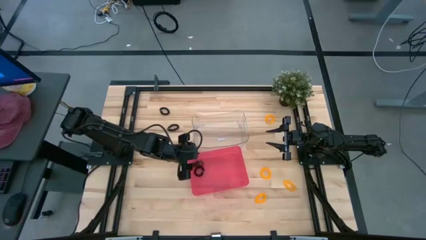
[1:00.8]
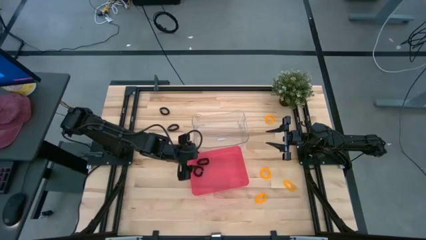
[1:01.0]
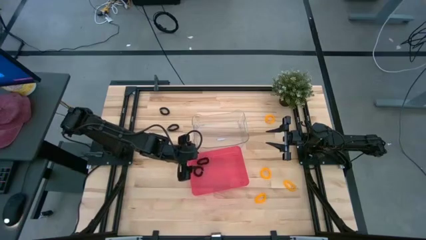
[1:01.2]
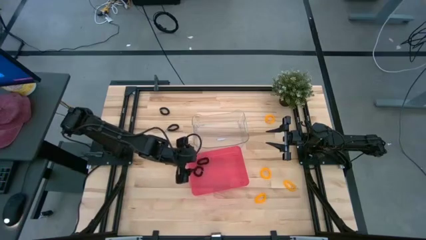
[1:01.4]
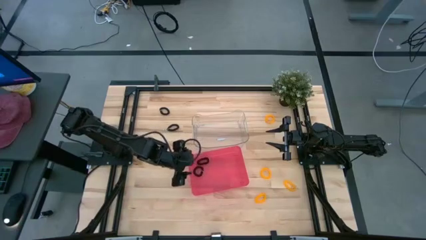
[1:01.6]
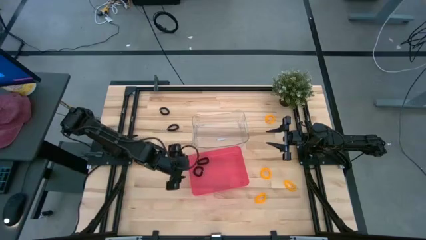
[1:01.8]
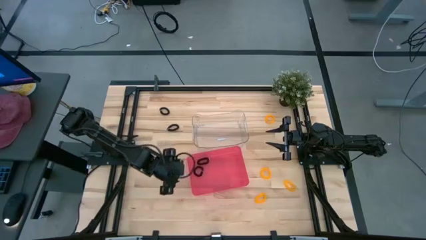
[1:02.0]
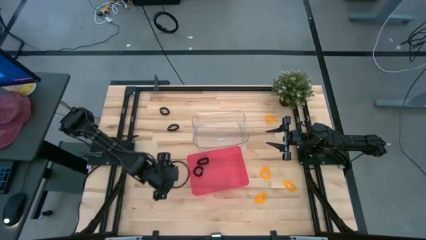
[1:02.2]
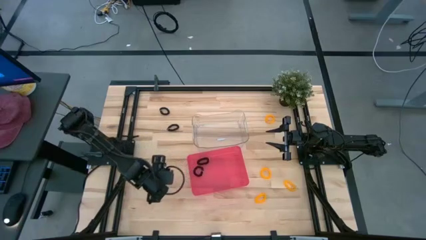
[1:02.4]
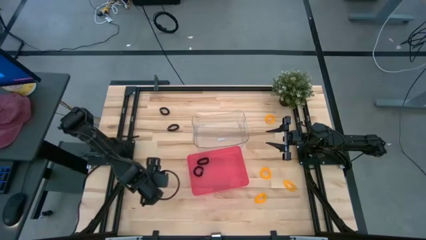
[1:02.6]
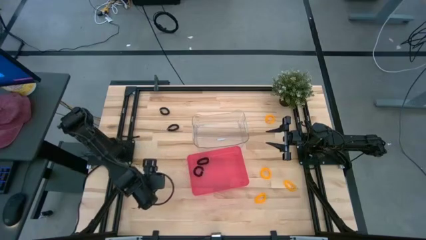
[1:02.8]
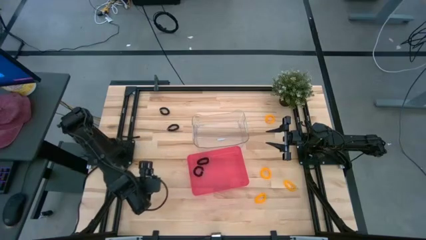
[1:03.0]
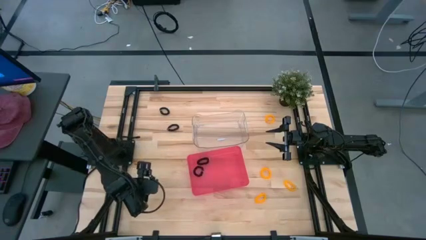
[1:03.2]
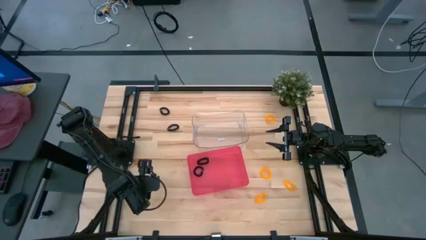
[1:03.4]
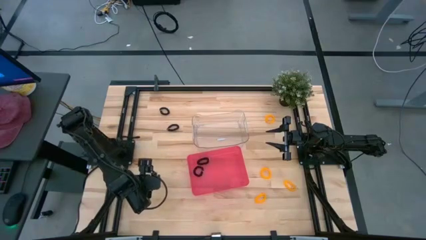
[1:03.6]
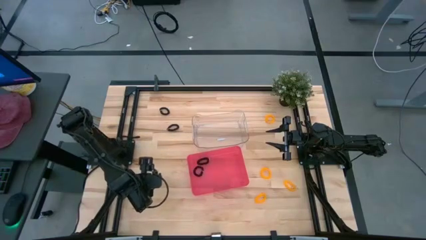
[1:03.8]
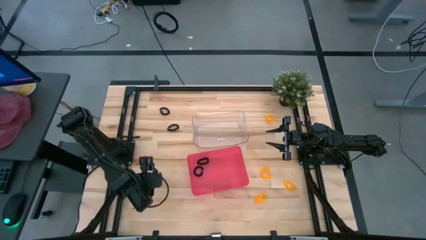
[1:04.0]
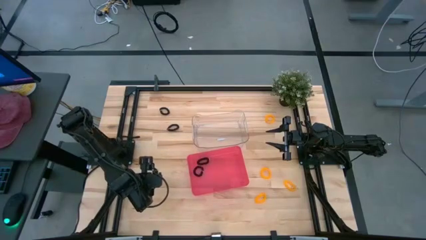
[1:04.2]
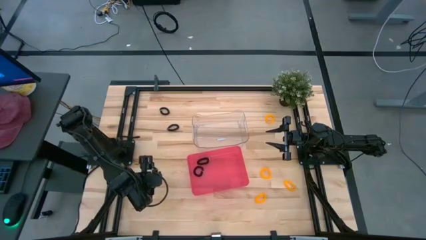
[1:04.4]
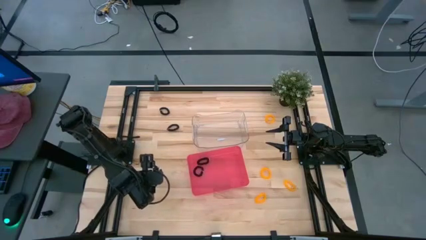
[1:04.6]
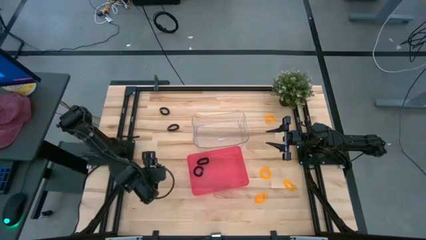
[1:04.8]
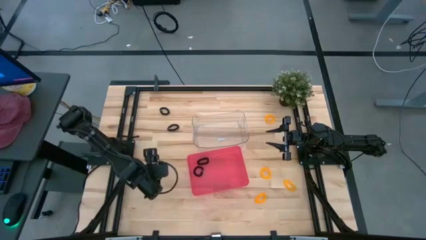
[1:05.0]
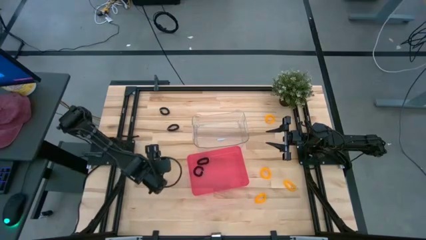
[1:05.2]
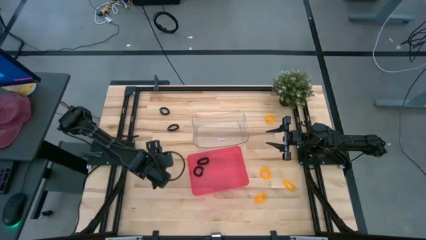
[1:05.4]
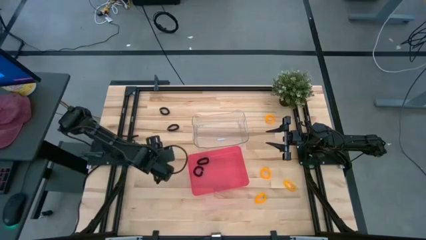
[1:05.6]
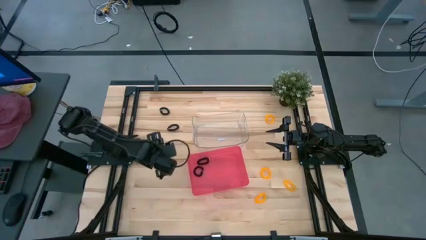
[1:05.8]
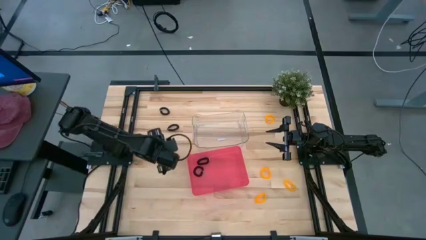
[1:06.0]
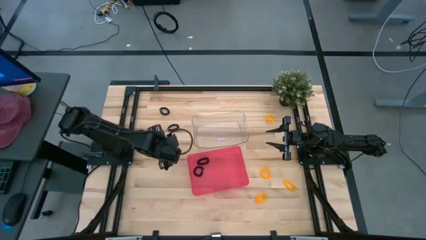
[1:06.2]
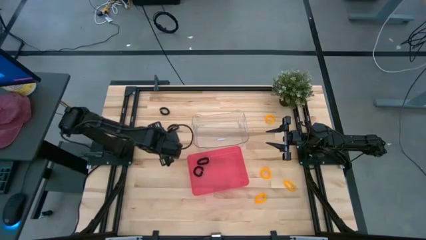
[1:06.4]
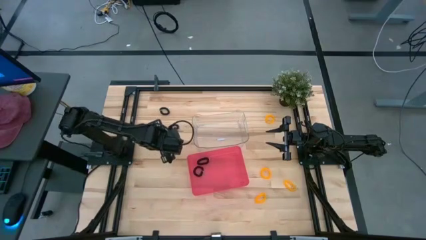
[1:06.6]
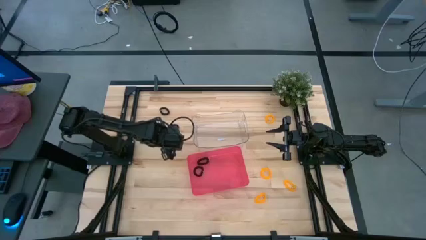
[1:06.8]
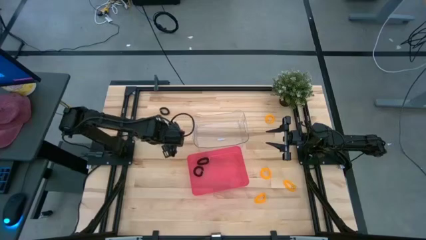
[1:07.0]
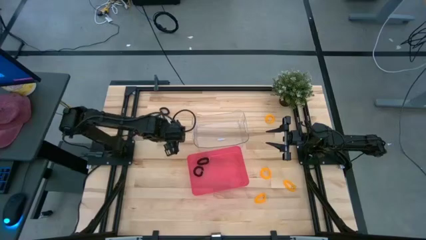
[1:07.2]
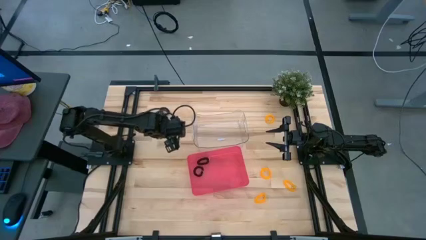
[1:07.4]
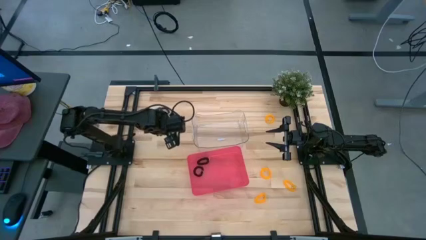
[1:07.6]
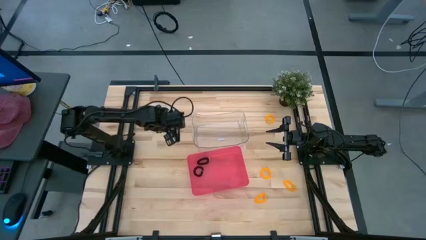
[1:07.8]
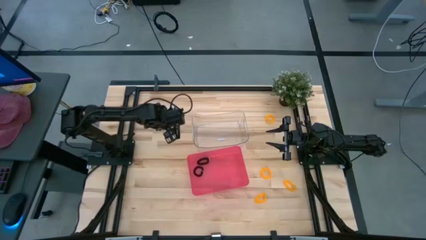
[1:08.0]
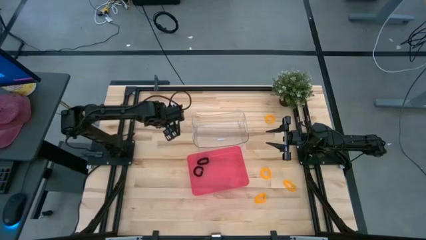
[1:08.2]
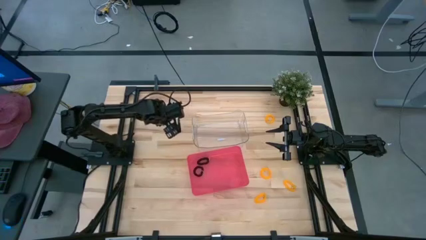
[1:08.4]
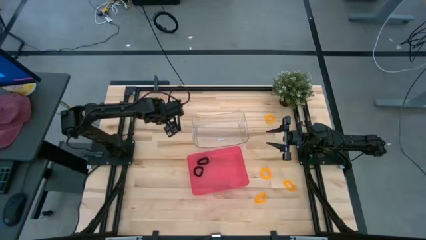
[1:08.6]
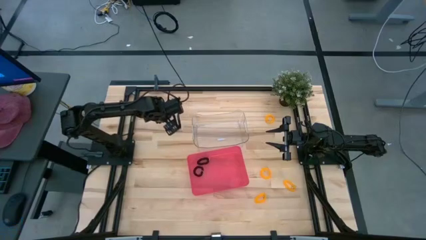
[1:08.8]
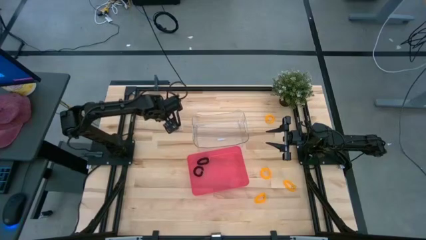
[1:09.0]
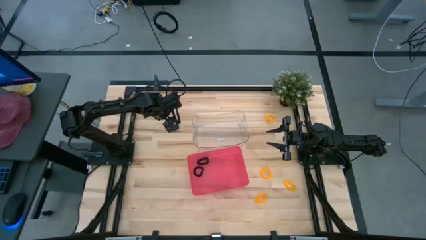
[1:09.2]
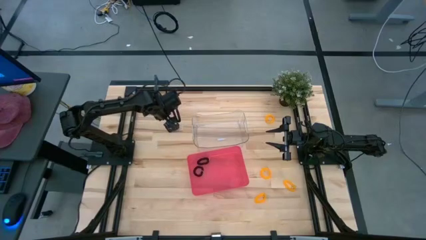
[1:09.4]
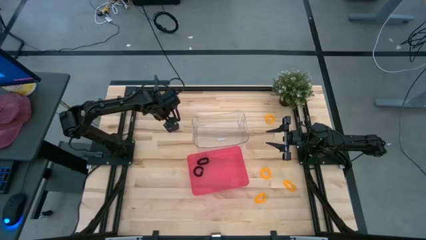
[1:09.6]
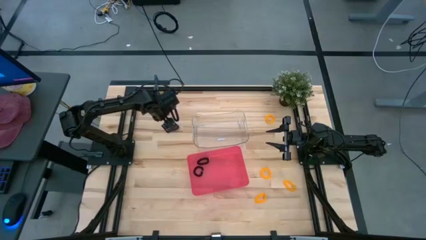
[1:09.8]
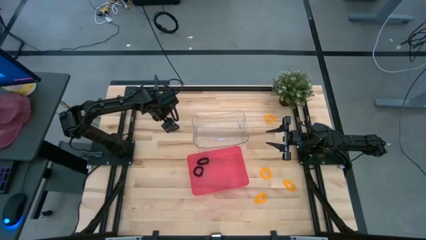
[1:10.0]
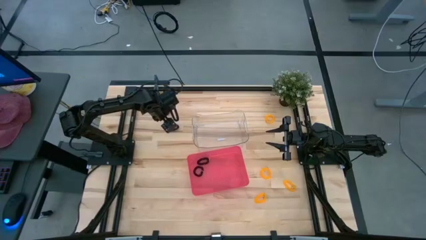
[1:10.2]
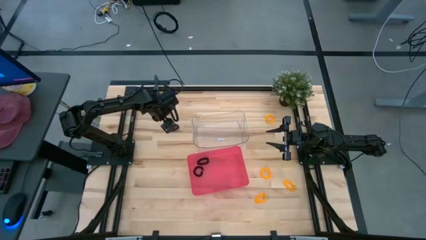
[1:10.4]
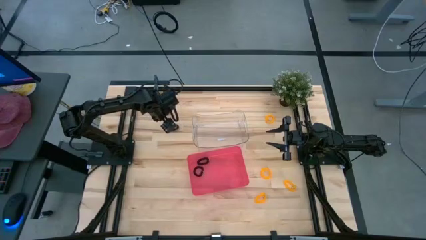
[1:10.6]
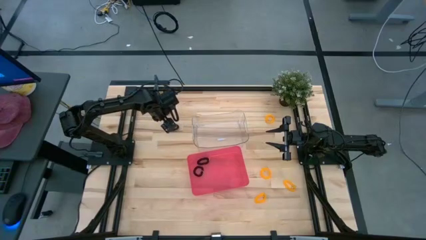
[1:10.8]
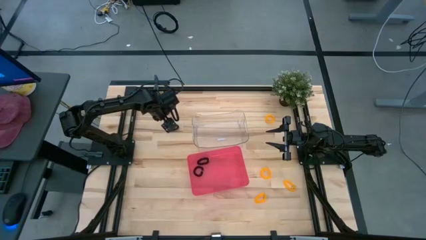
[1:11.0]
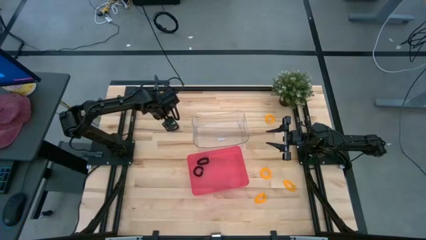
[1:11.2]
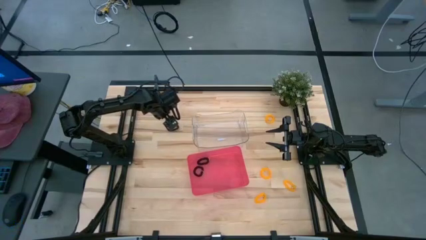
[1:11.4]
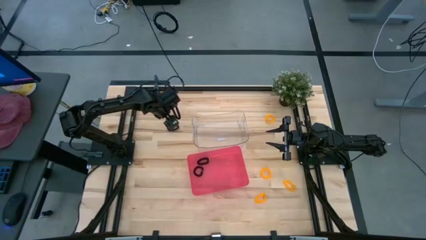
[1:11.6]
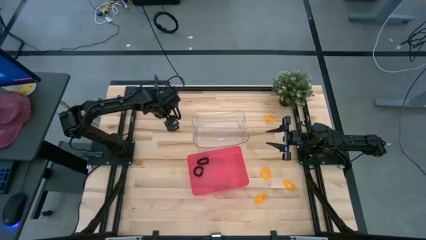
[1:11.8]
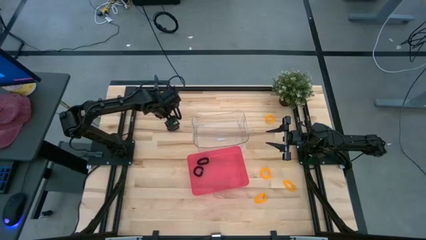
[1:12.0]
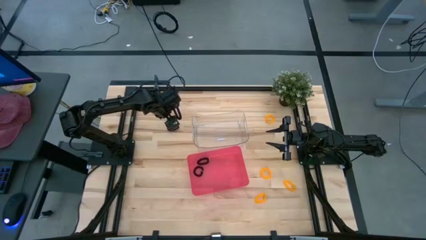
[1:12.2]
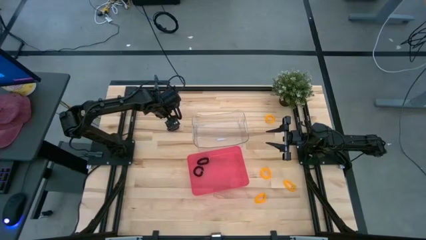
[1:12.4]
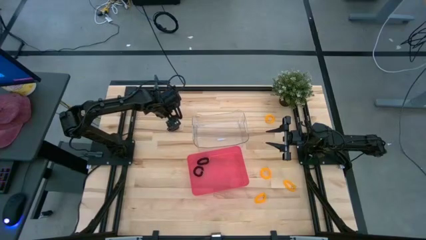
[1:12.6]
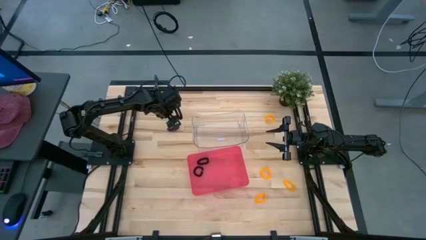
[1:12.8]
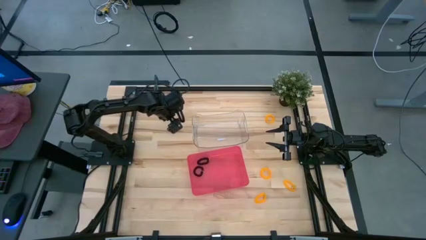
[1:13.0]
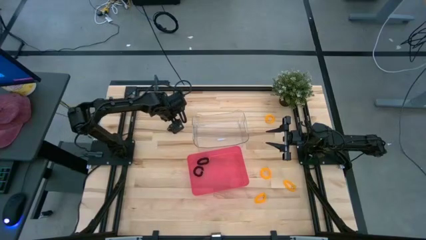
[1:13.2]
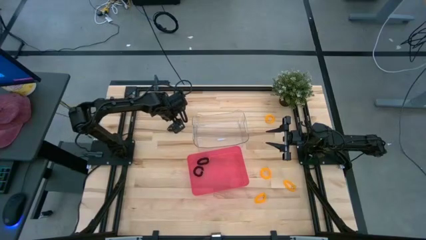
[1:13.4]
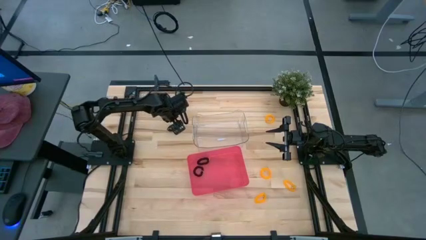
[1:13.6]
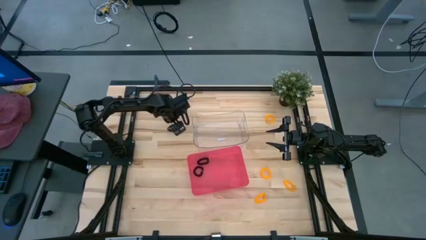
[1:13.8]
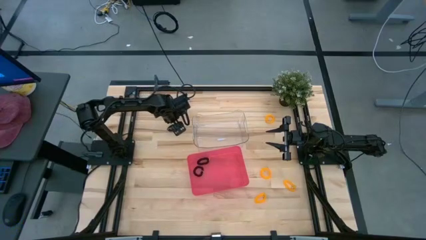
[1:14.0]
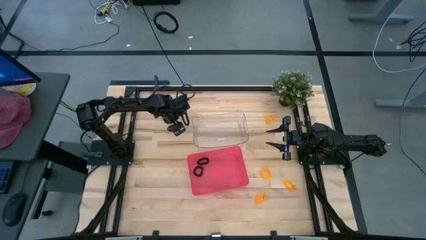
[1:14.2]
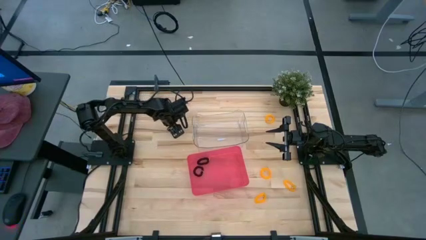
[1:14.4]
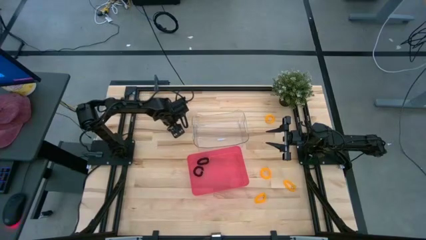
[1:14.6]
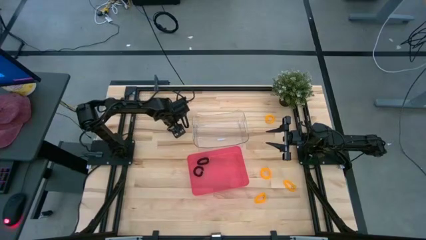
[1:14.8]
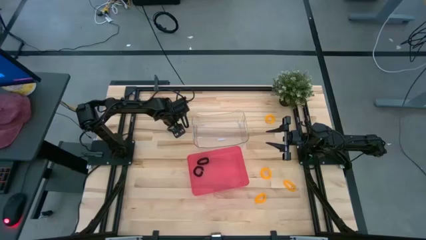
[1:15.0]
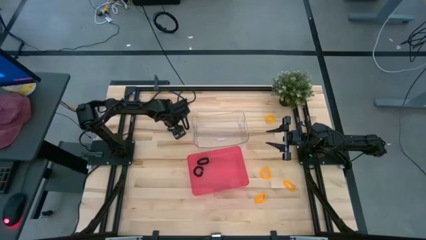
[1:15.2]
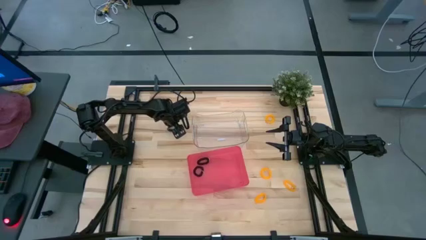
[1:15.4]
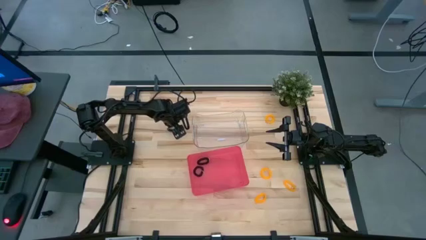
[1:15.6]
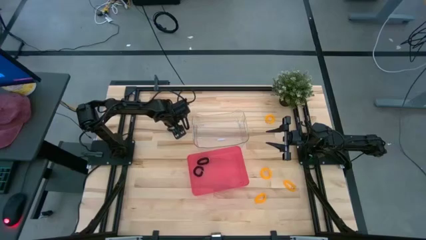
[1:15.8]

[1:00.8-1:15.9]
Task: Sort spring keychains
Put the bottom black spring keychain into the red bin
